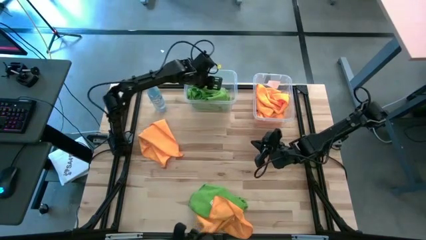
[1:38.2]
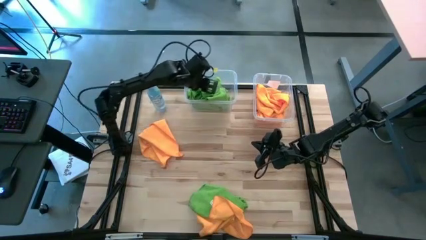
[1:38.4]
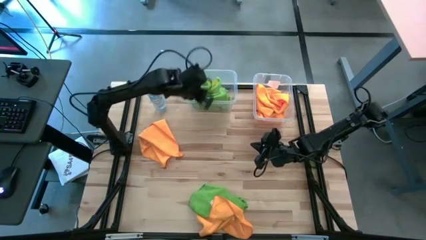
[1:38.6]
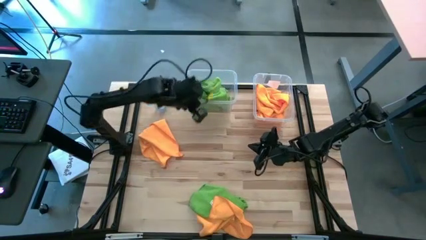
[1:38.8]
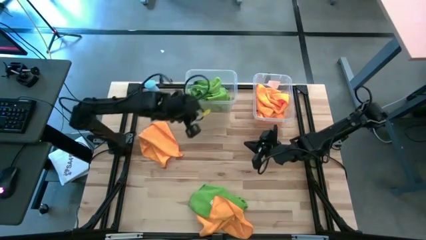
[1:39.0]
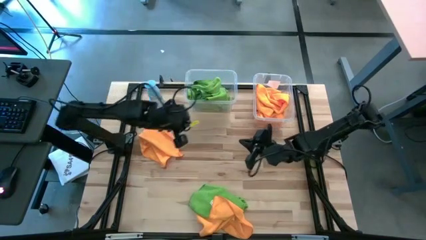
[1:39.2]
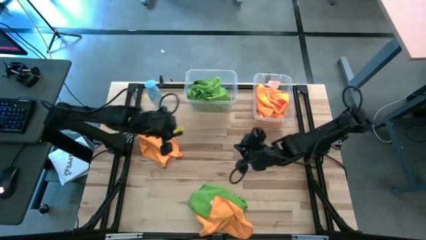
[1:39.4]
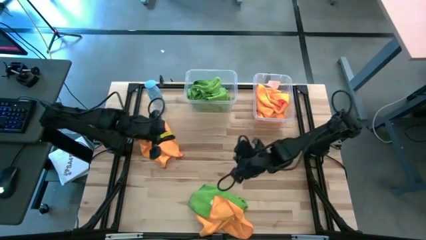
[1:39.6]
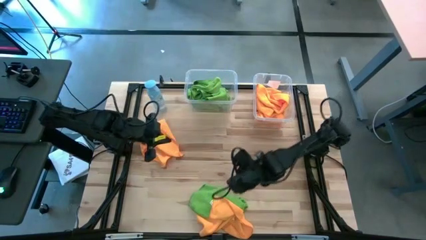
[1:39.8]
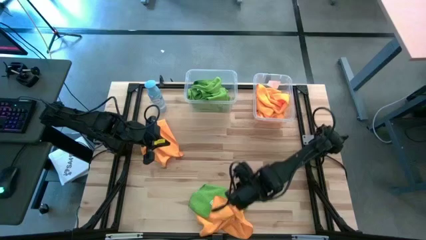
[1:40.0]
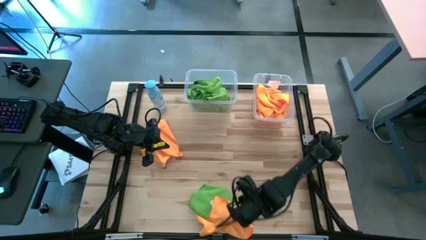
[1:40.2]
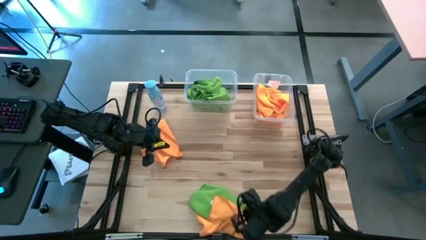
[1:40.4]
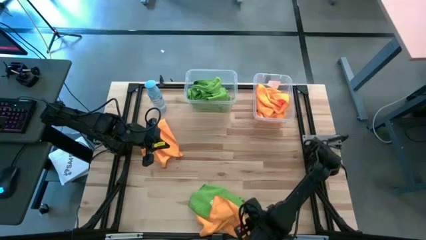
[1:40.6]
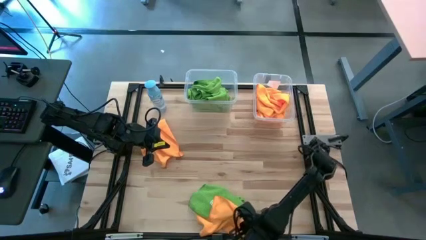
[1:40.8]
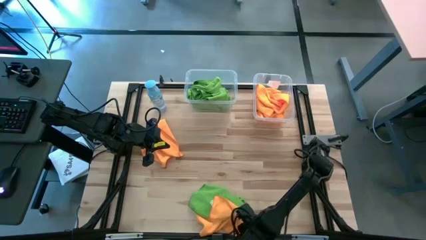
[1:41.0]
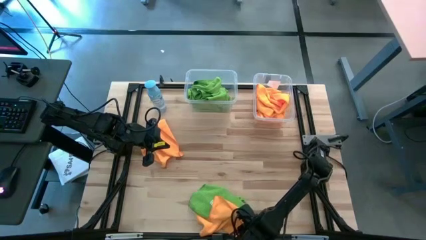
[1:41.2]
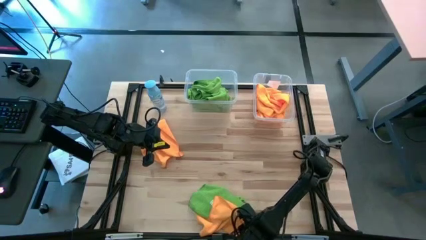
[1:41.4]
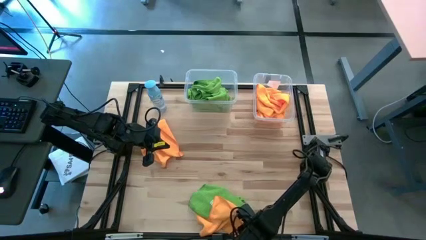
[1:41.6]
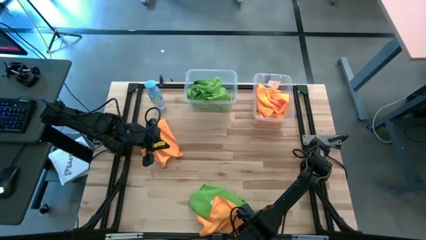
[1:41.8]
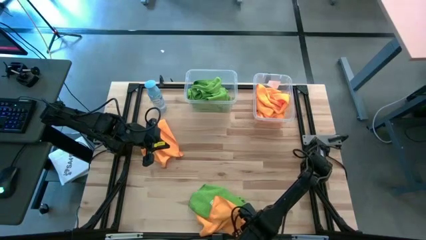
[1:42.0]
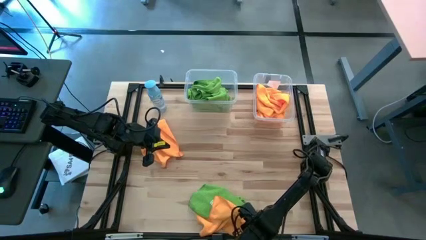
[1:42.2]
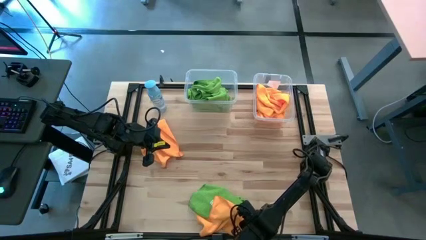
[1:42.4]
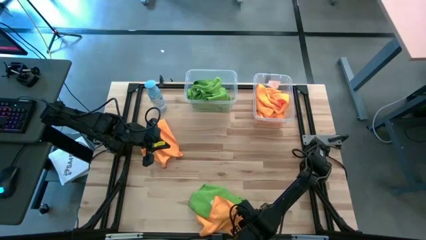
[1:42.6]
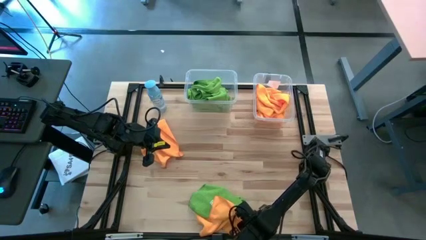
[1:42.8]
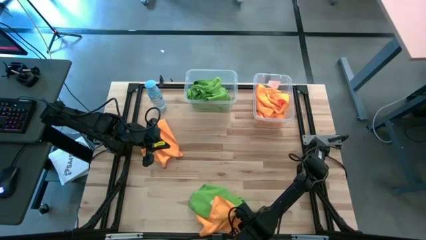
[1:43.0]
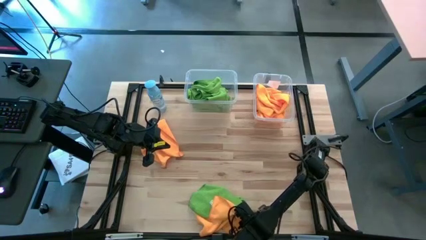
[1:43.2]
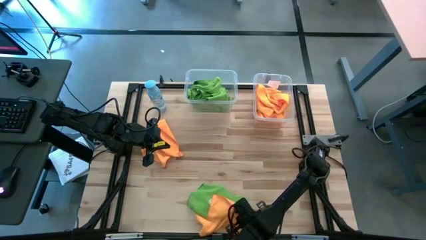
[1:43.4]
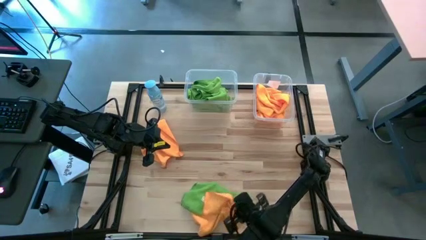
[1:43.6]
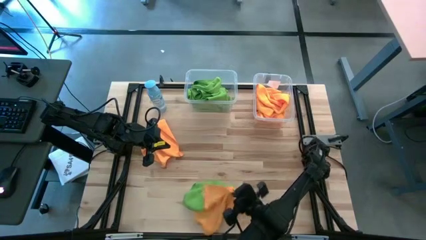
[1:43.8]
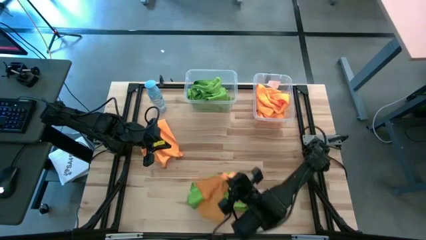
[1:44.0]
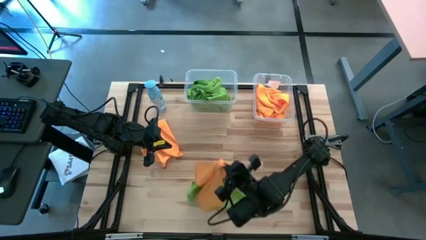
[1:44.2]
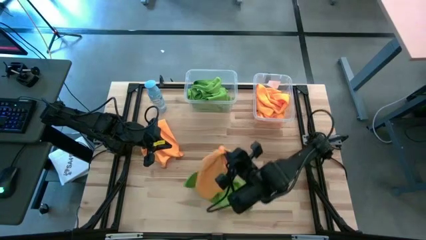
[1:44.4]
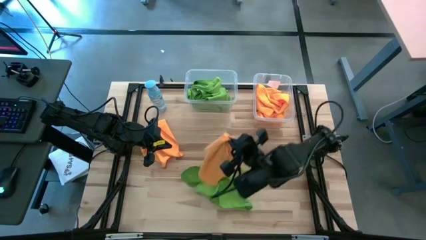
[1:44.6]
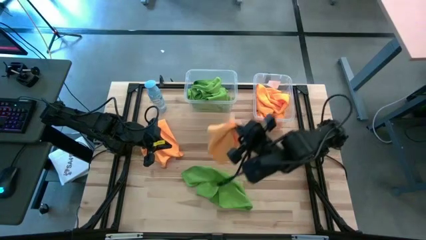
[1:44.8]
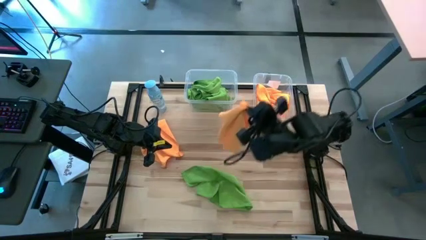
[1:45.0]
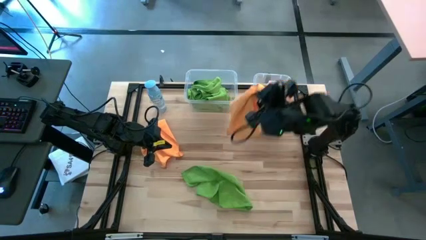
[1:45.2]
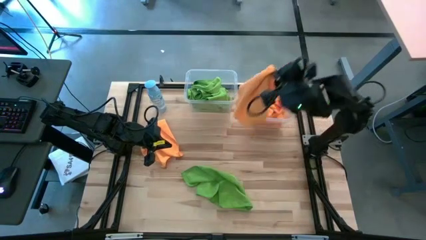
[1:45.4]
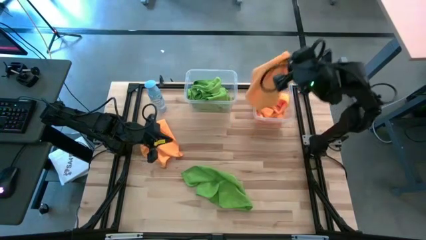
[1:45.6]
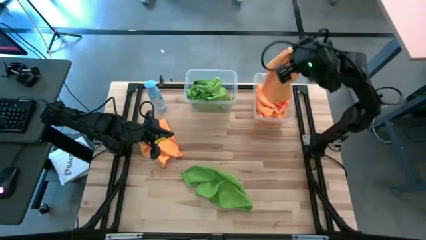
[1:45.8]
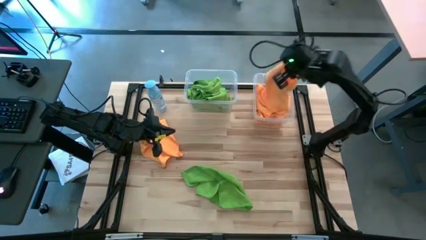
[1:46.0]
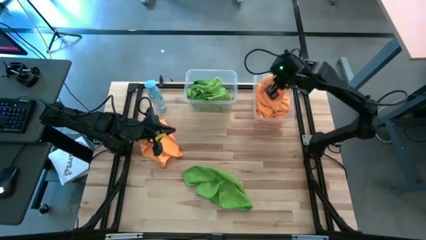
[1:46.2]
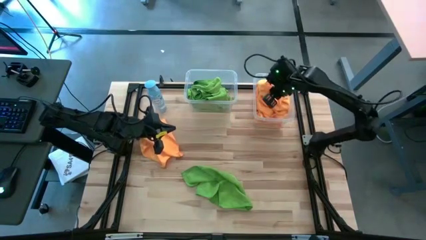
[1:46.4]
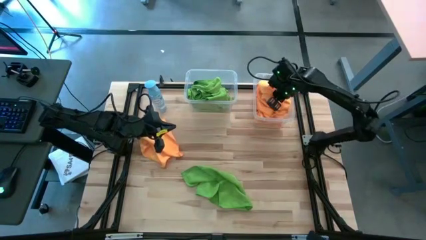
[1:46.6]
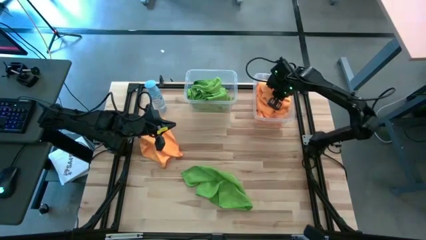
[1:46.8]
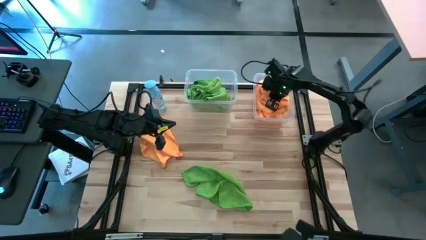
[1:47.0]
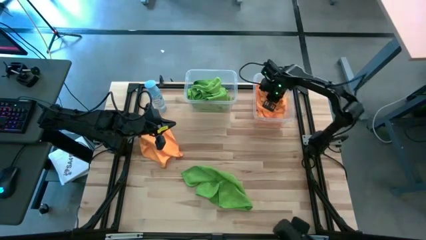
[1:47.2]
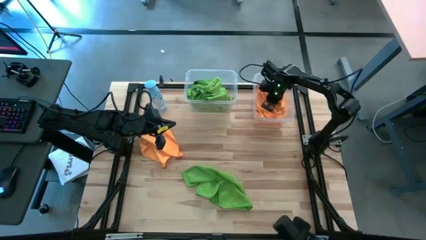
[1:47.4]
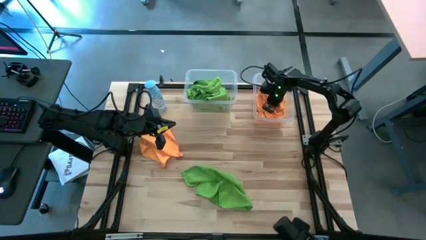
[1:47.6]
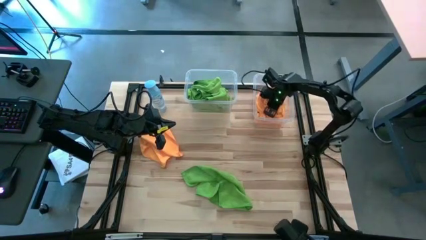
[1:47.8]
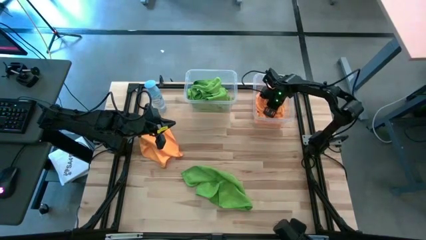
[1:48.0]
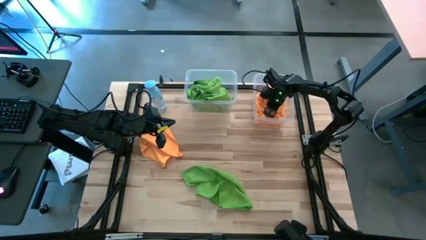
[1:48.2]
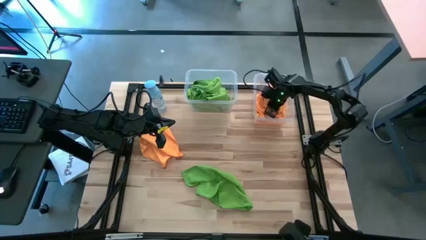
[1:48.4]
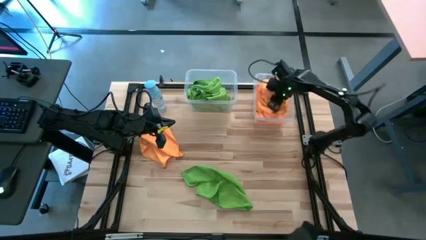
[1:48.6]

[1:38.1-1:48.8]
Task: Sort microfiber towel by color & place in baskets
Put the yellow towel into the right transparent bin

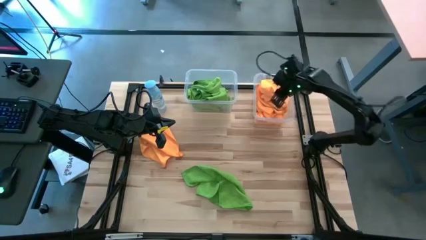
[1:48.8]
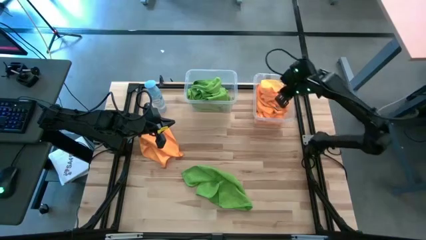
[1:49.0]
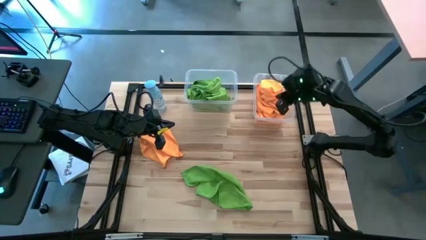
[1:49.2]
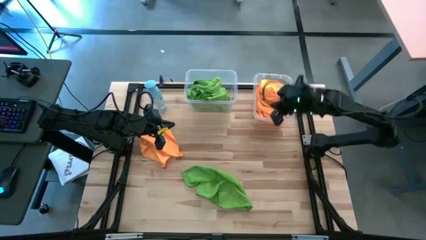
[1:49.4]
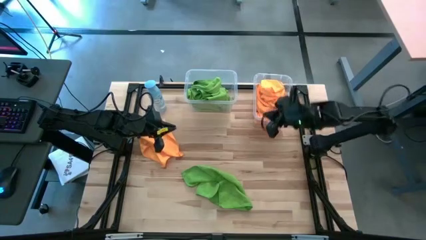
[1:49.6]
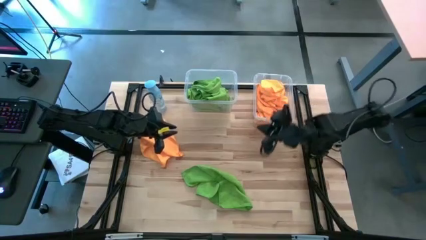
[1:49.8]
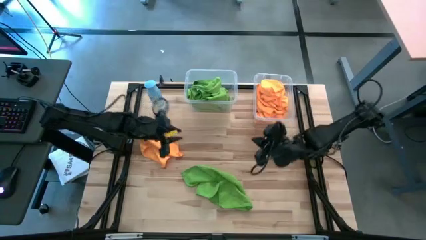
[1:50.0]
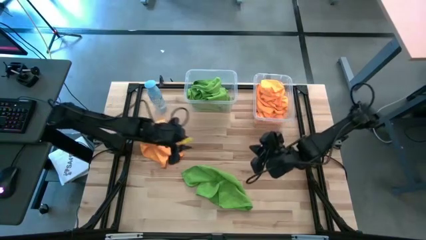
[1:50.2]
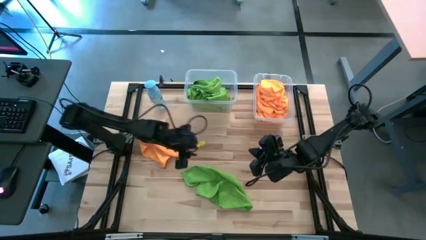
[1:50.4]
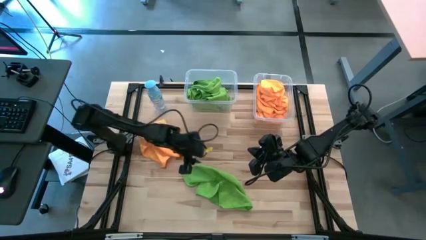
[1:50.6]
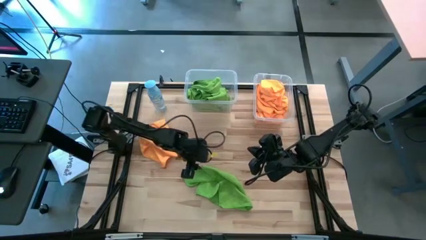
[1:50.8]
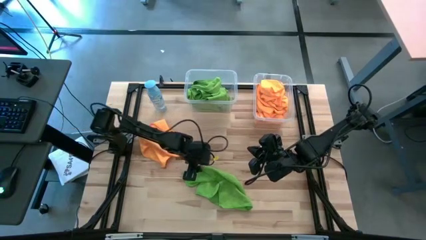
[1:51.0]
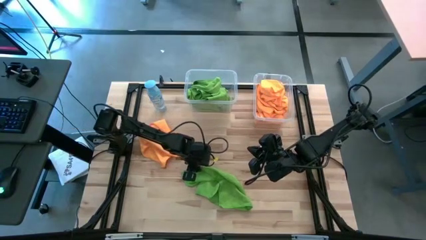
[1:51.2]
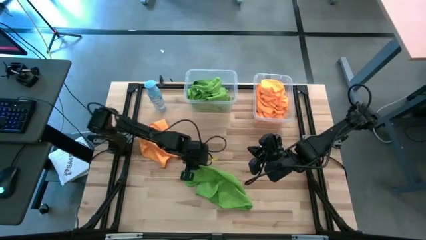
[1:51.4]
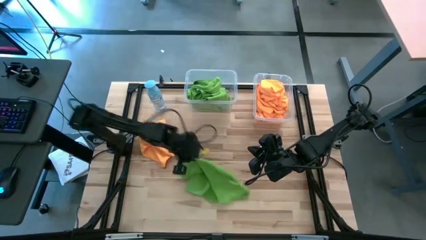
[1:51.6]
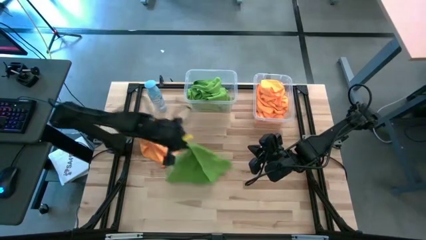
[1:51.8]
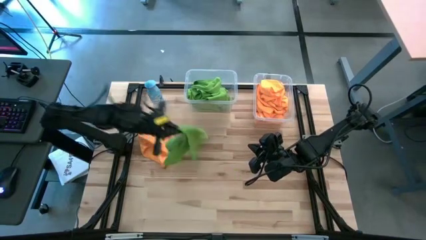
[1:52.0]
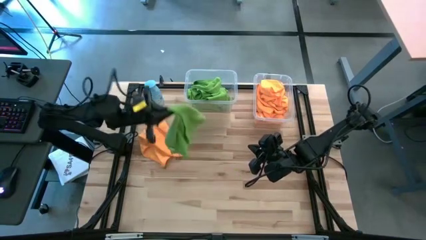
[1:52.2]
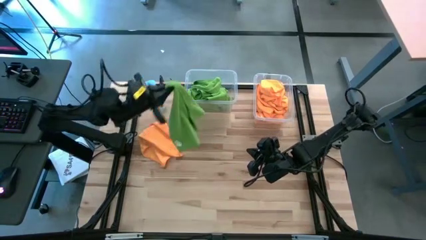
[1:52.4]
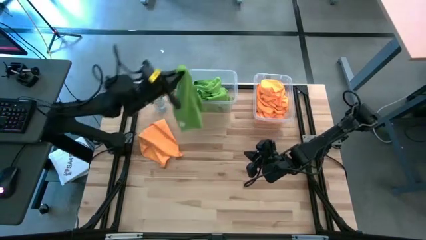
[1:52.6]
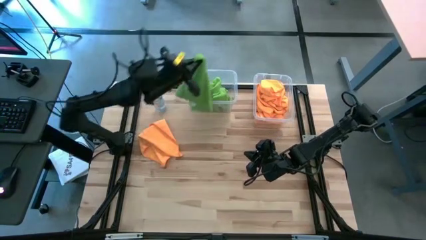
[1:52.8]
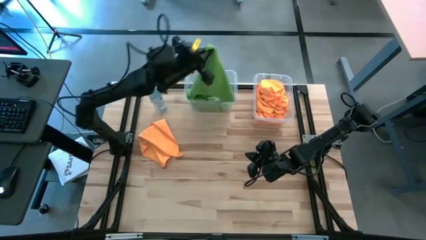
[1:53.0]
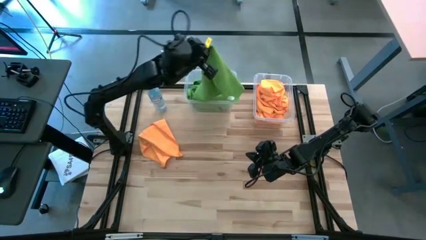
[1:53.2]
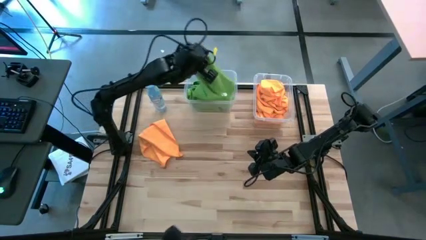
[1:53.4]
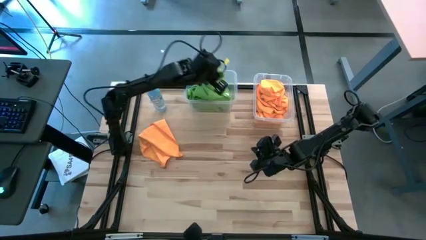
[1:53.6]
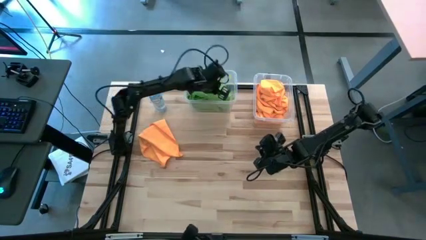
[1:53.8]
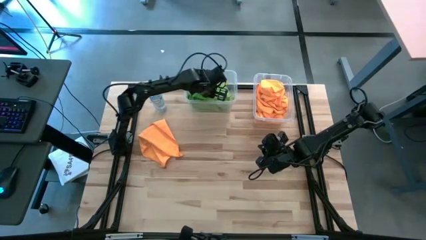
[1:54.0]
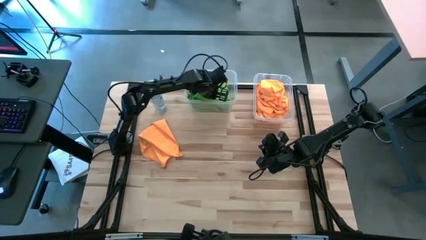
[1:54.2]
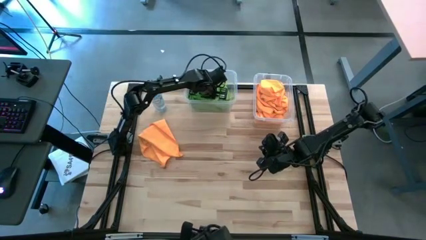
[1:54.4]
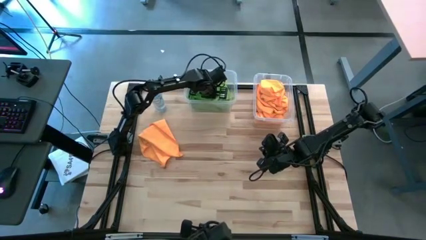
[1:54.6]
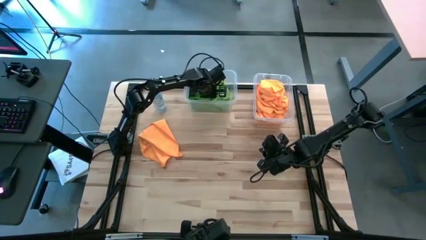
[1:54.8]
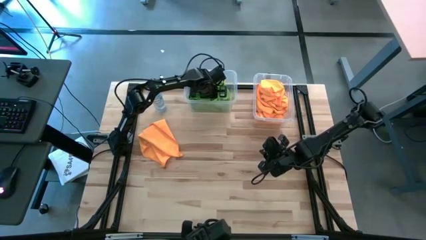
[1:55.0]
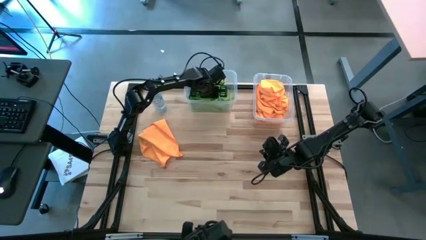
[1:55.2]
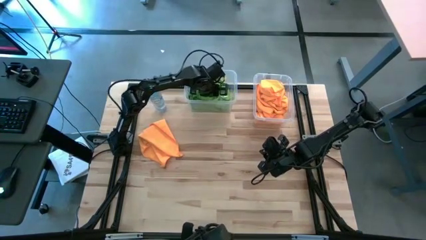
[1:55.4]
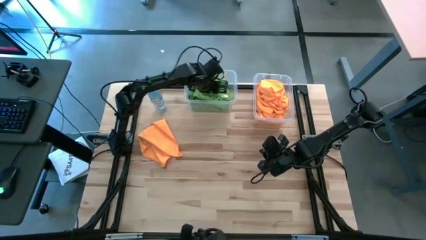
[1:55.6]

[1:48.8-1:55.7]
Put the green towel into the left transparent bin
